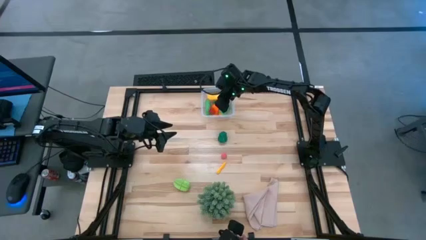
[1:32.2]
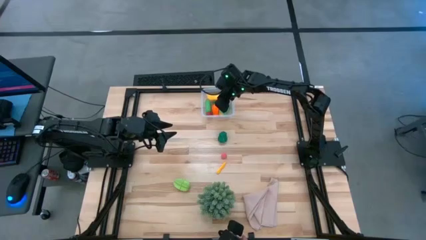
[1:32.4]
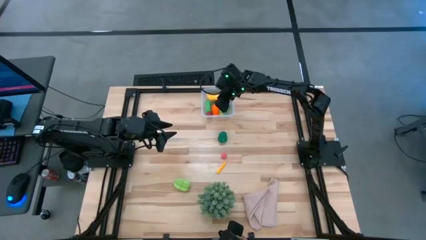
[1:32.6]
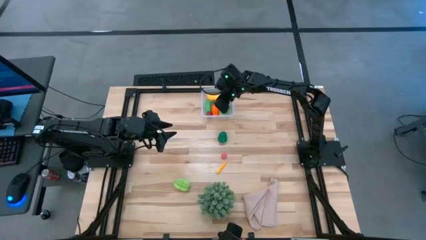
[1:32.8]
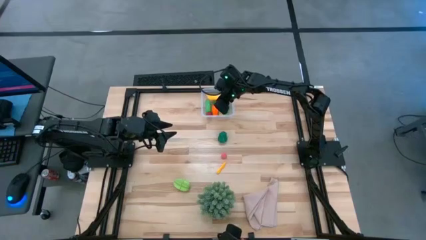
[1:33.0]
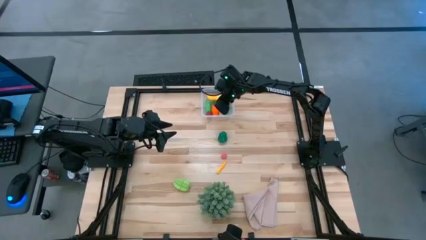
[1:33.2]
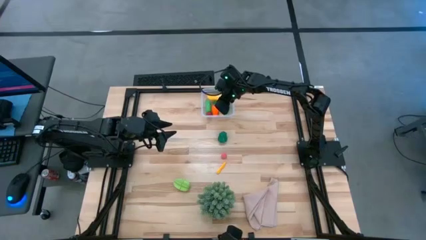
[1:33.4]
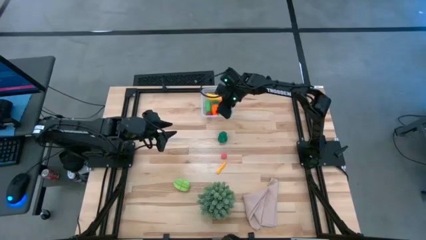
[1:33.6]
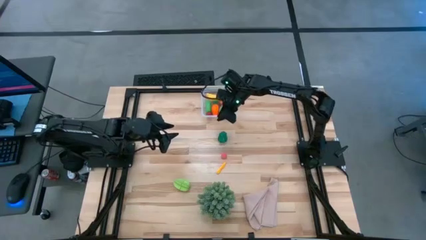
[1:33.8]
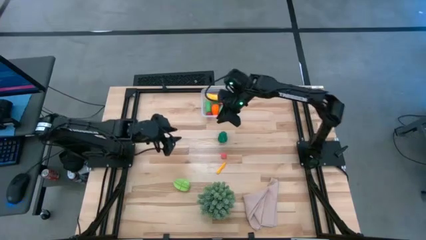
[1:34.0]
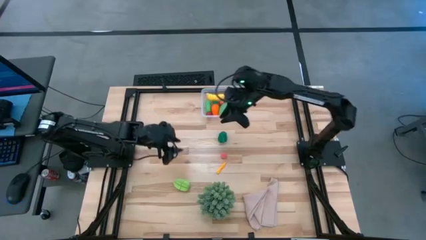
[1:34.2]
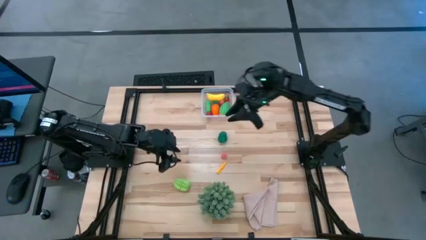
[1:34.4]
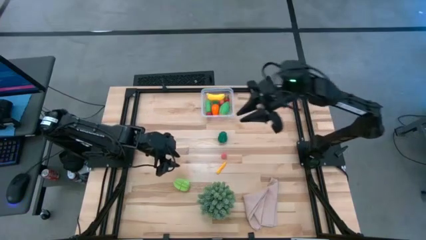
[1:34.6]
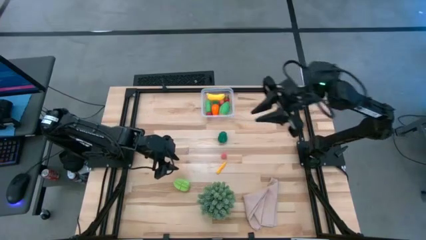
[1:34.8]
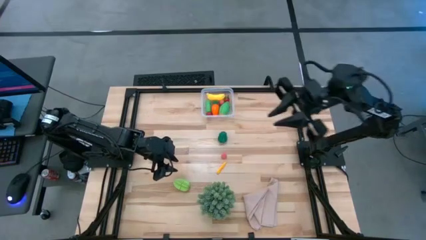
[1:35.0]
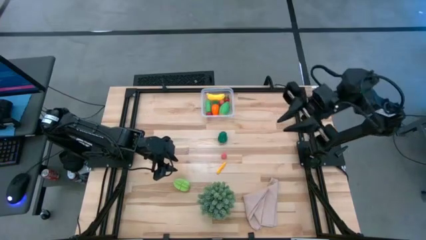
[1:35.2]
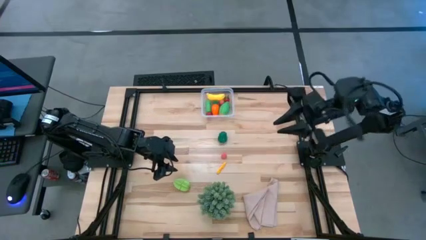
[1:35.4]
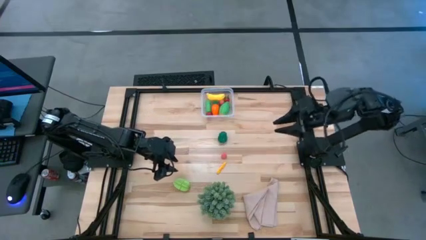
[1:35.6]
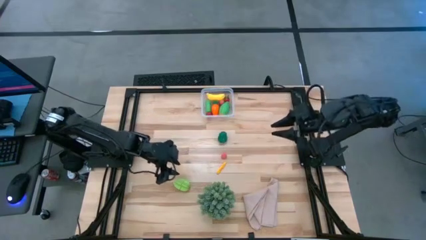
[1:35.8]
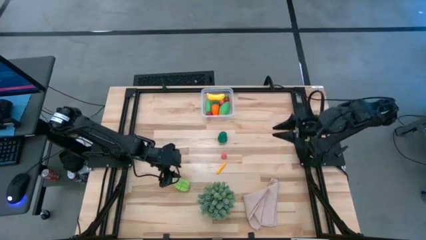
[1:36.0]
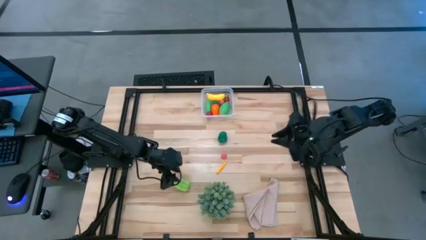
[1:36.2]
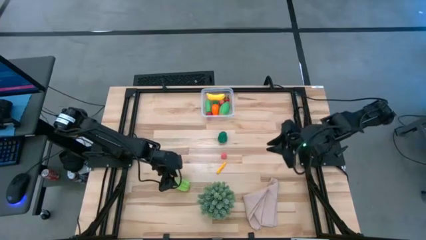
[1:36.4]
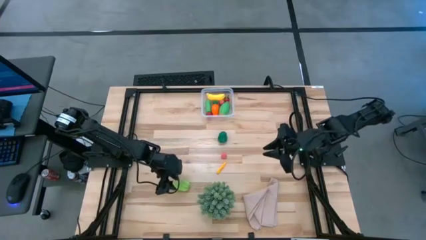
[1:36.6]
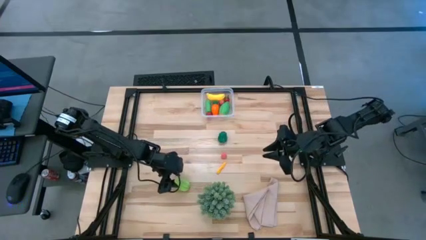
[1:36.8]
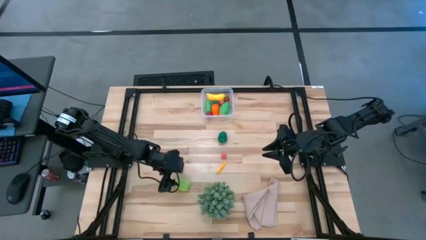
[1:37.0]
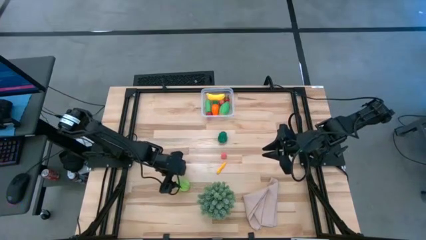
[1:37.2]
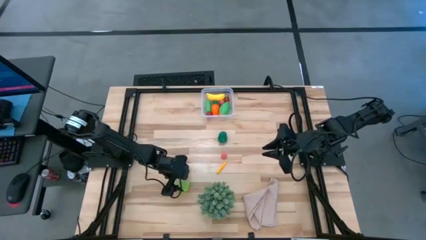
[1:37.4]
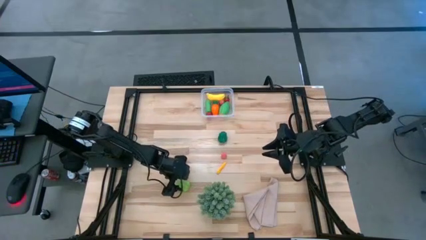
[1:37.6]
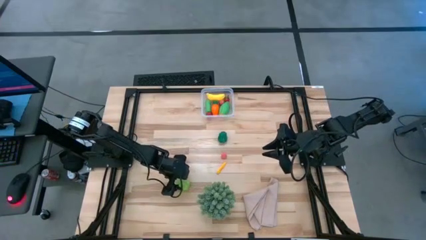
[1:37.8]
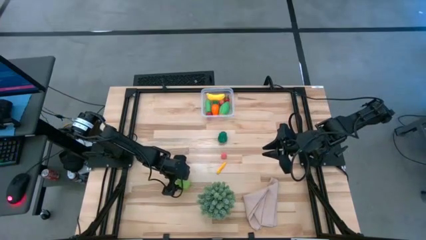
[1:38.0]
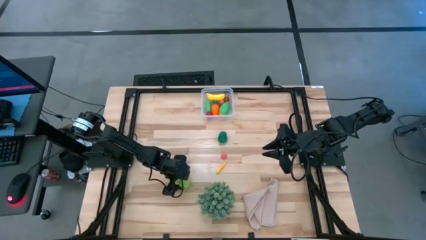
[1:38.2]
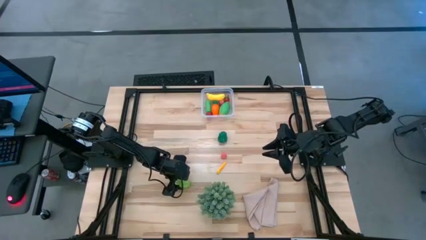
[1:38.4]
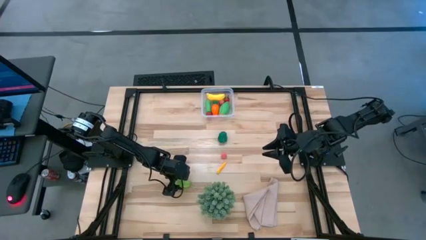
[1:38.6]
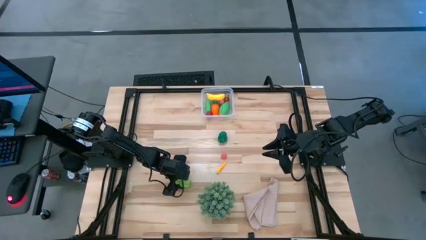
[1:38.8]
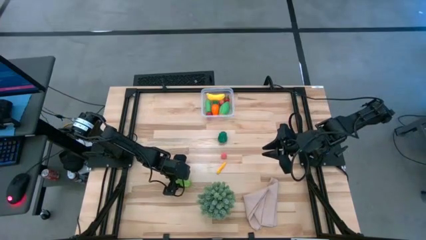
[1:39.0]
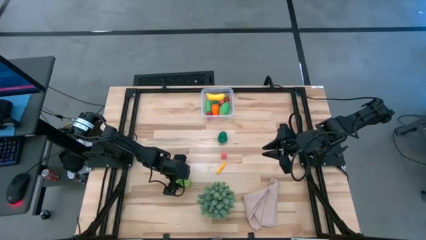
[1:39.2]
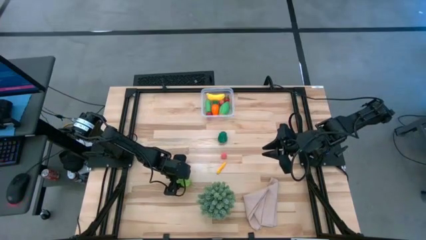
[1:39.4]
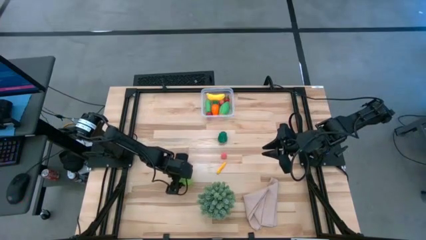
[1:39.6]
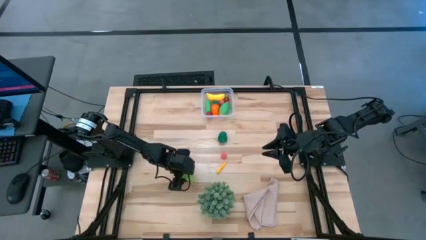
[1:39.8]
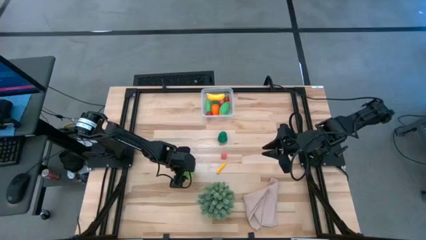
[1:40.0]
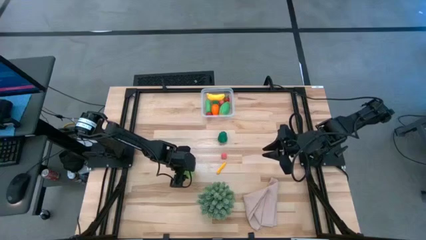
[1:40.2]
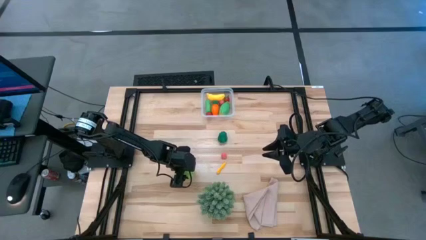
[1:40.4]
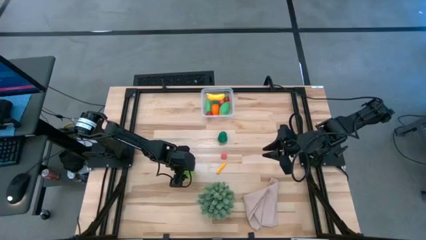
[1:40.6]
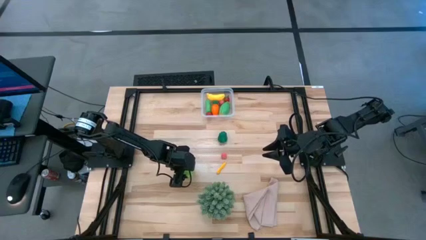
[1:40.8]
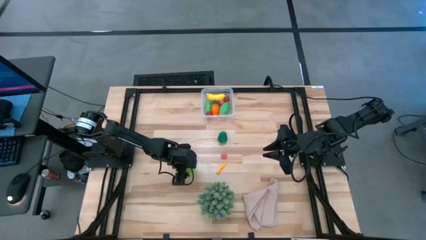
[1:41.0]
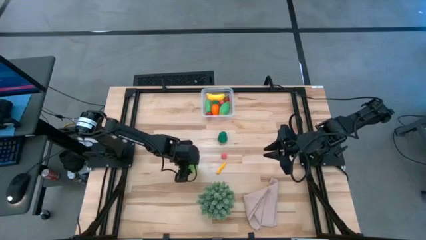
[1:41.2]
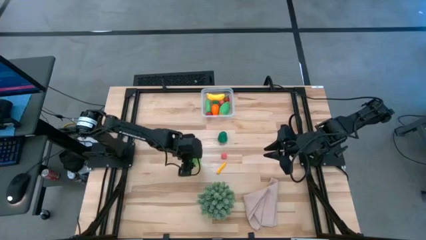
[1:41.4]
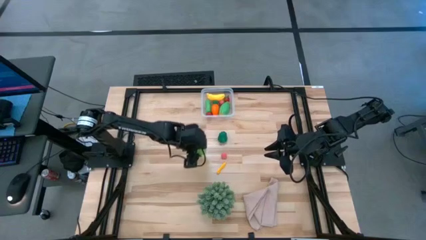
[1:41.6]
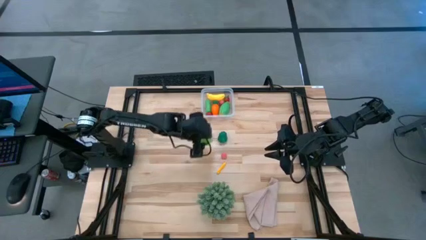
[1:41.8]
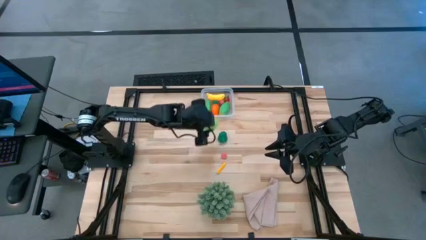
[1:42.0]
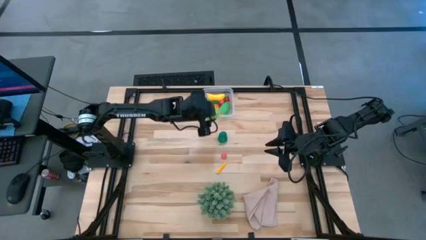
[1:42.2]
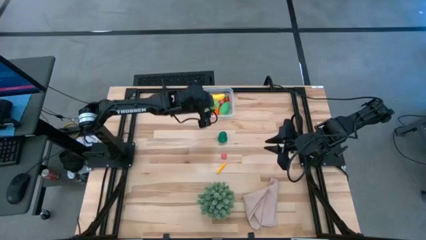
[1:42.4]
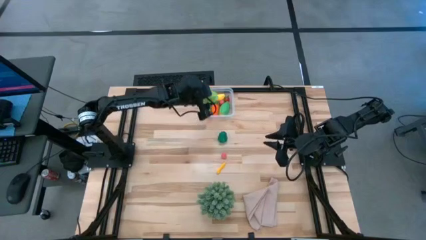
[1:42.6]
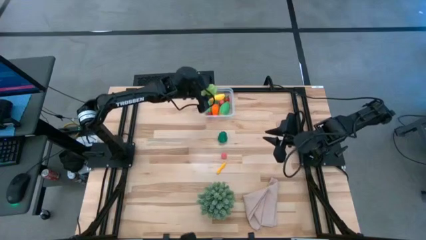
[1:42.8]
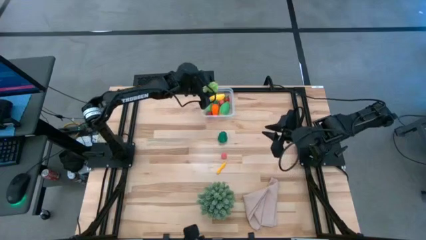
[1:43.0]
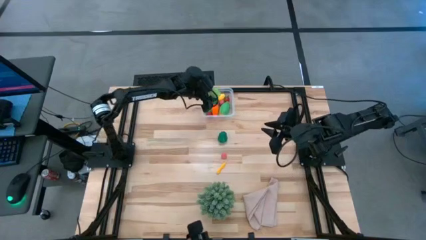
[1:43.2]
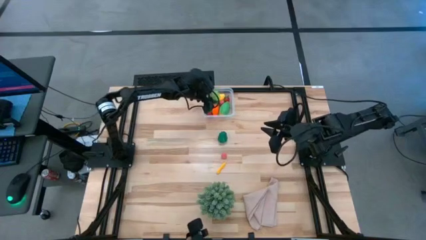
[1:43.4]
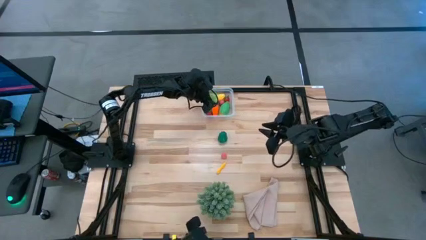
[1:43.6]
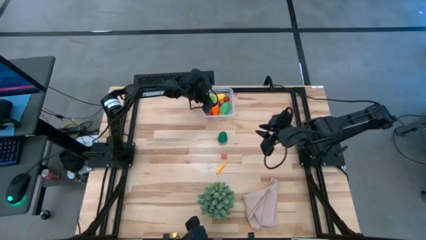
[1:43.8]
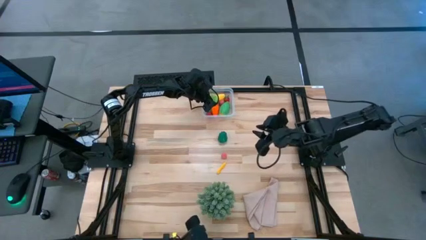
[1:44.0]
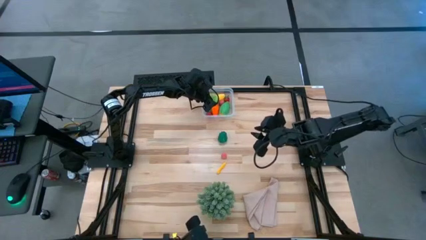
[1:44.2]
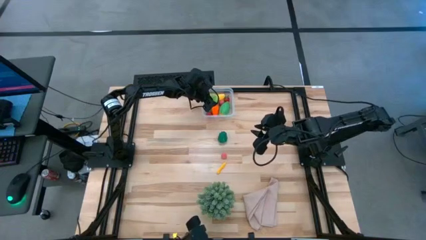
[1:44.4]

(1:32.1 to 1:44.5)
Task: Pick and placing Produce into tupperware
Put the starfruit into the transparent bin

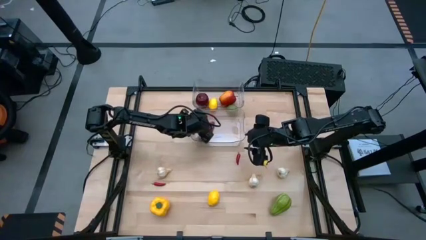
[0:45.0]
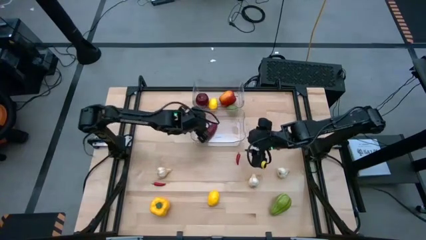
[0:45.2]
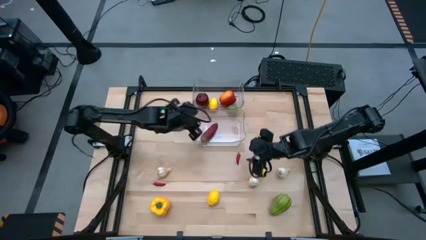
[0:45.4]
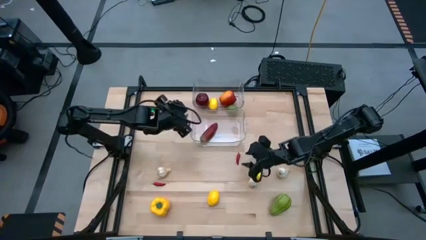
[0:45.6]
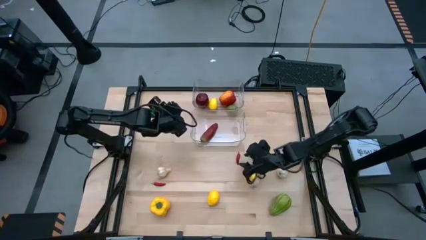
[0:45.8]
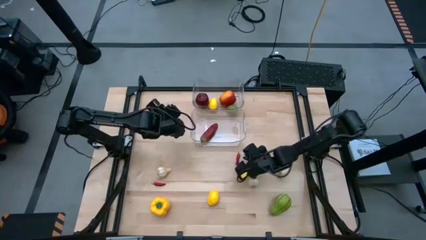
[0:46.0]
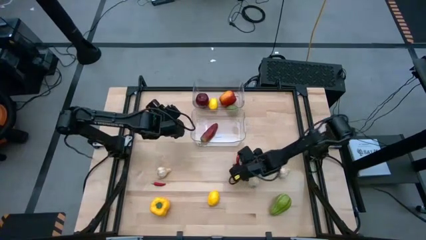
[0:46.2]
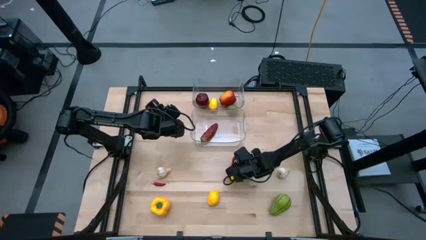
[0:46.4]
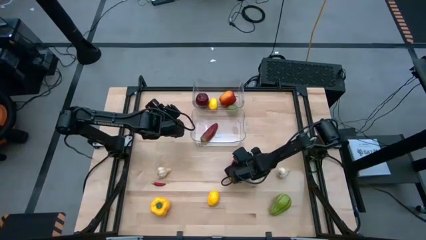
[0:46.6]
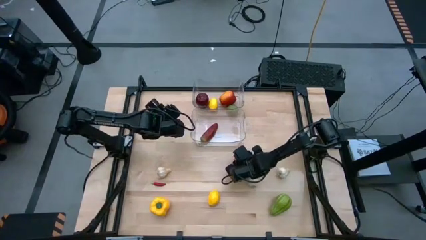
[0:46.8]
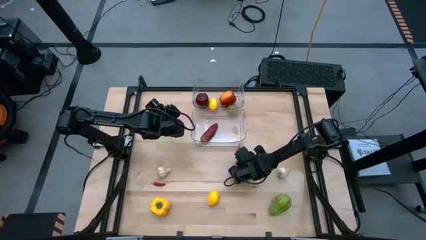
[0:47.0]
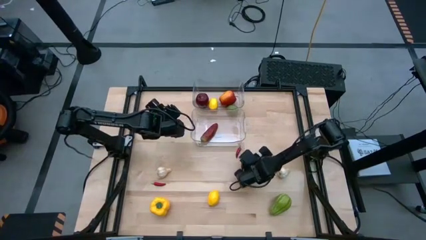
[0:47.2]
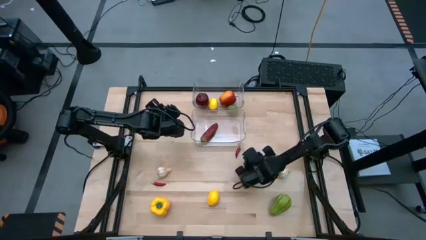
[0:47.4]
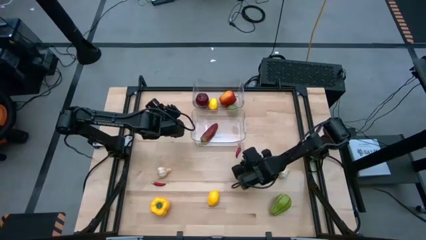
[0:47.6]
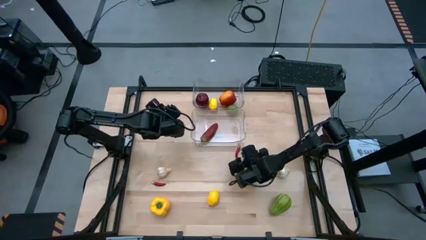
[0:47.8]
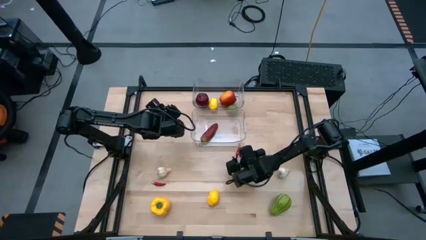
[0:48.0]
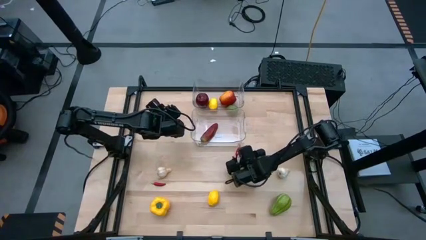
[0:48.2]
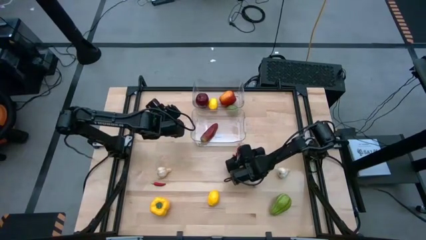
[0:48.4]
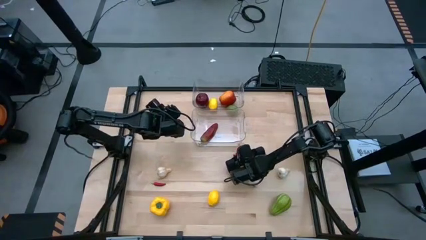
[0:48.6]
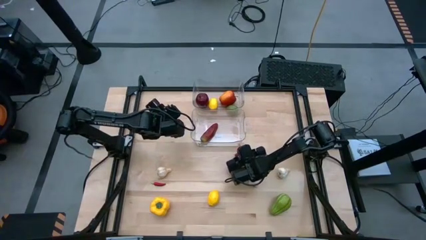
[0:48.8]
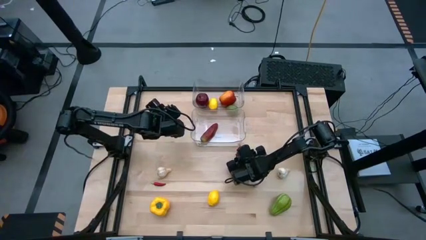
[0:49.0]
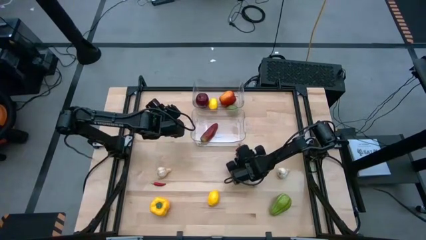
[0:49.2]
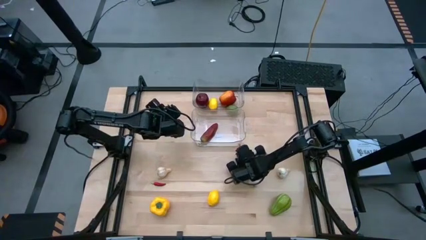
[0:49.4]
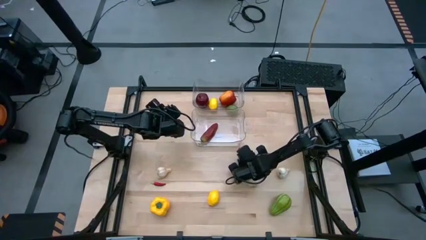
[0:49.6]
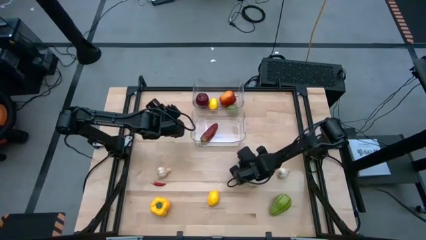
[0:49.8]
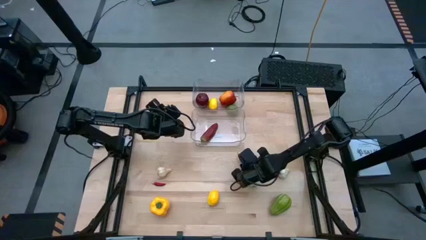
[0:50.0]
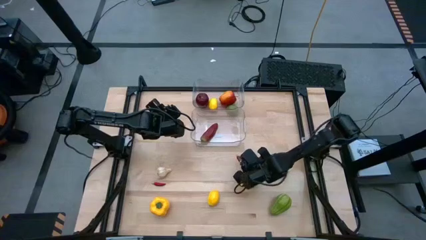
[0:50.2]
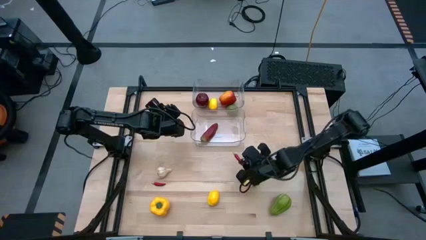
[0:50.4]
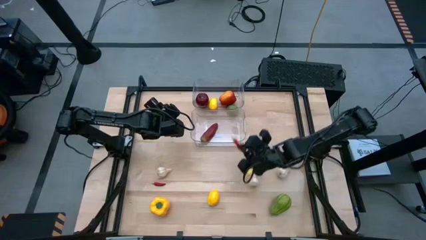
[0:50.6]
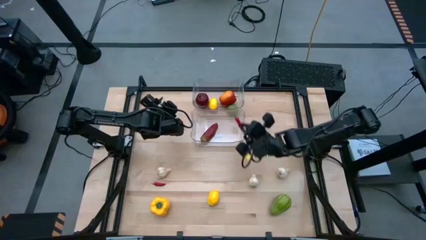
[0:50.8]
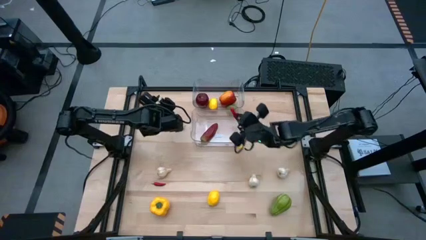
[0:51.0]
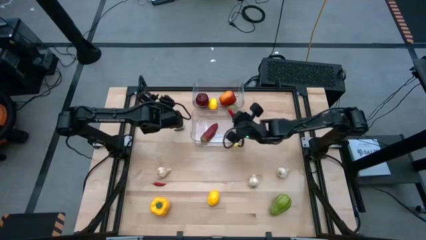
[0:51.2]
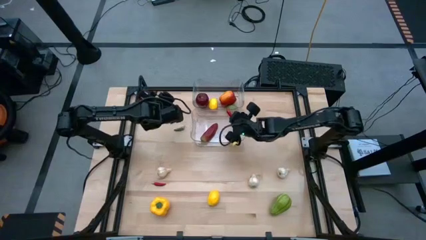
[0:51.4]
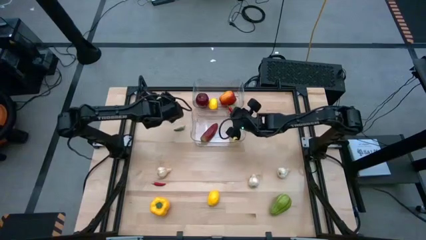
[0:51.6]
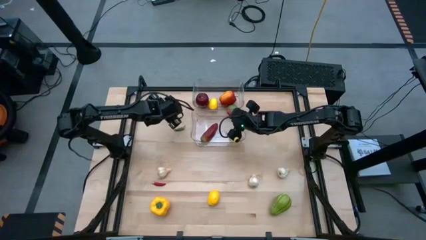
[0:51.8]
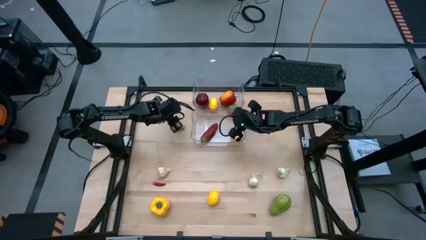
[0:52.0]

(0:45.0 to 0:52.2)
Task: Sort produce into baskets
Put the right red chili pepper into the bottom transparent bin
